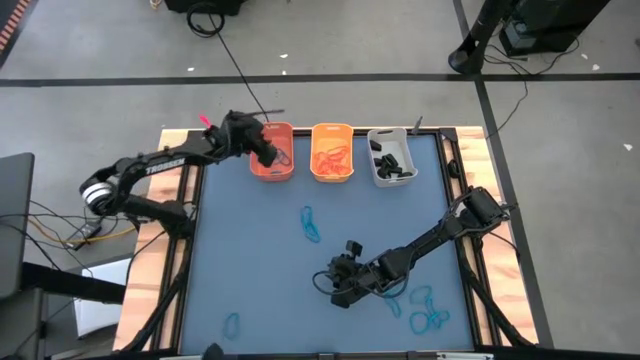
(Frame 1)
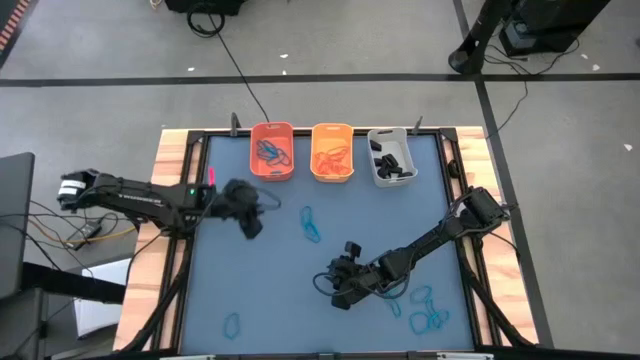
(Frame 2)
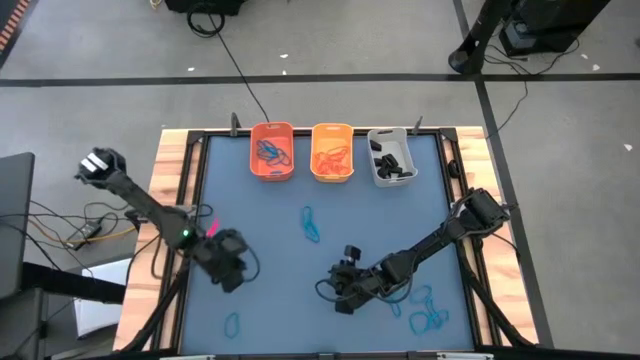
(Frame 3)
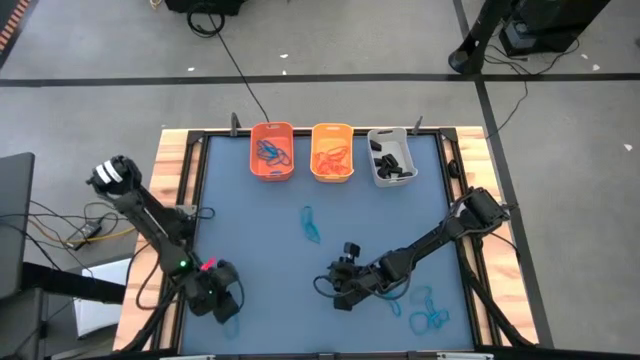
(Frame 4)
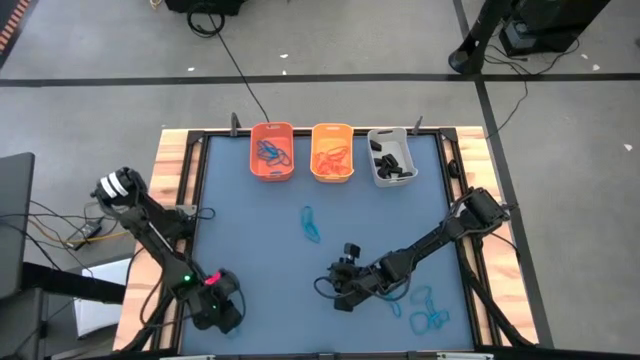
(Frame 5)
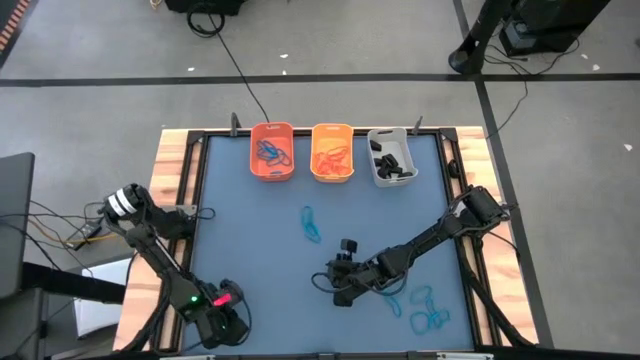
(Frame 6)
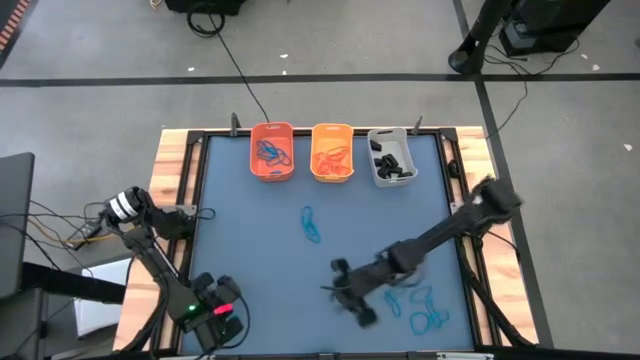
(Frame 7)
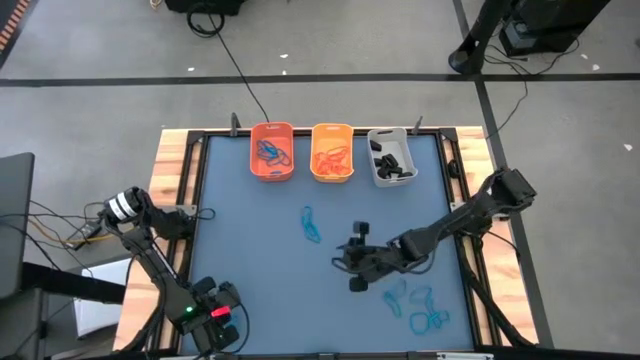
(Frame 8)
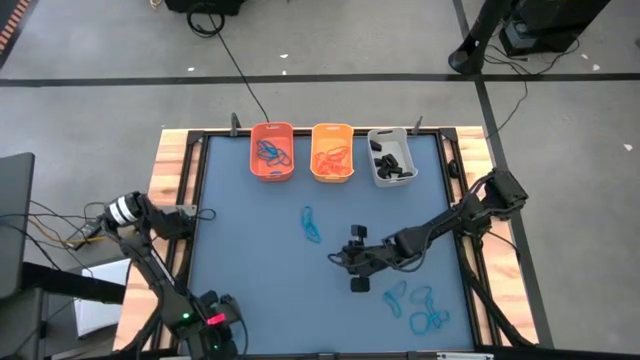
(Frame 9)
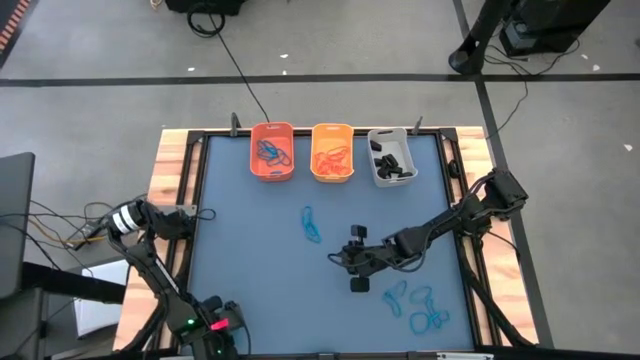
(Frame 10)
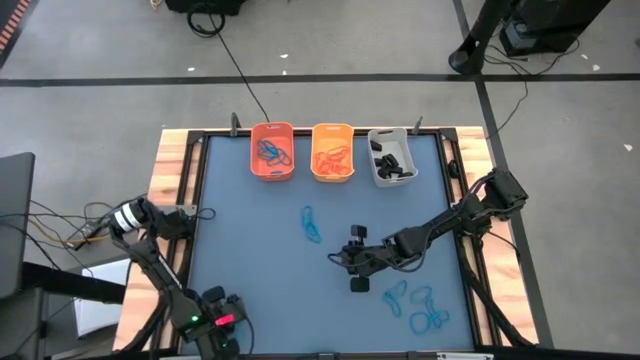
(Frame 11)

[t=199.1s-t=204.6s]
Task: Sort rubber bands into baskets
Put the blue rubber band into the orange bin

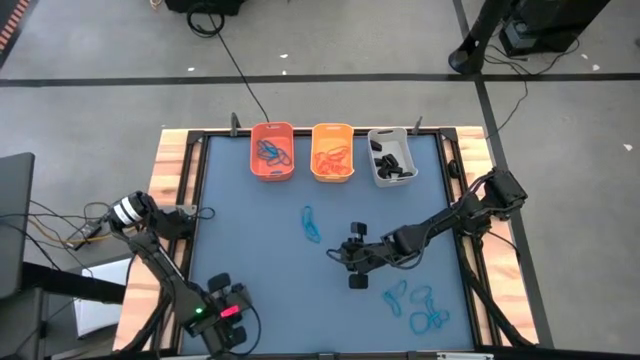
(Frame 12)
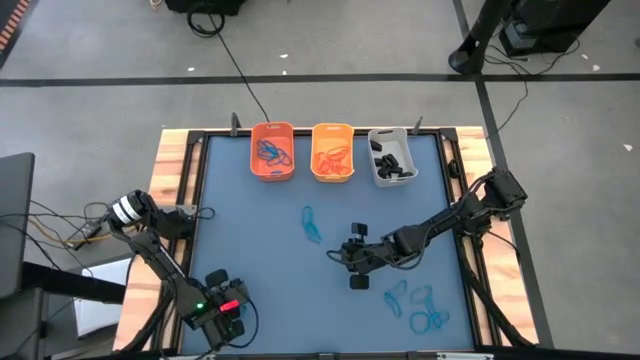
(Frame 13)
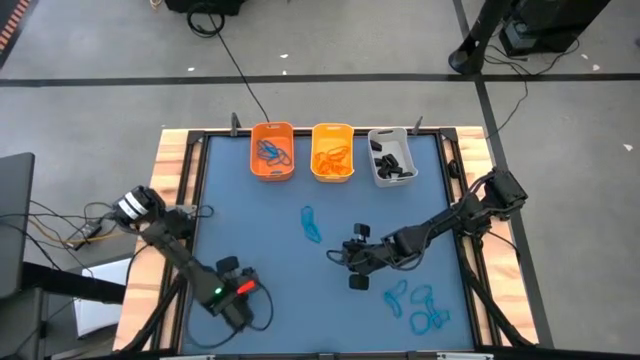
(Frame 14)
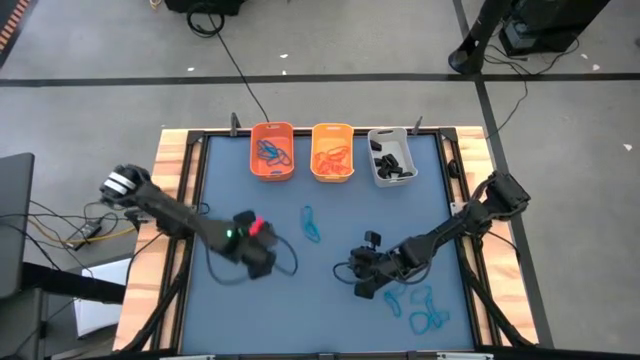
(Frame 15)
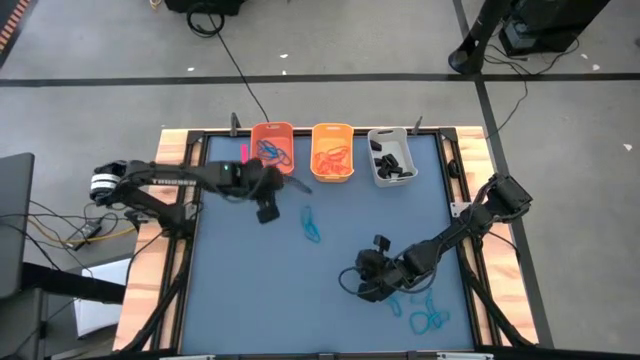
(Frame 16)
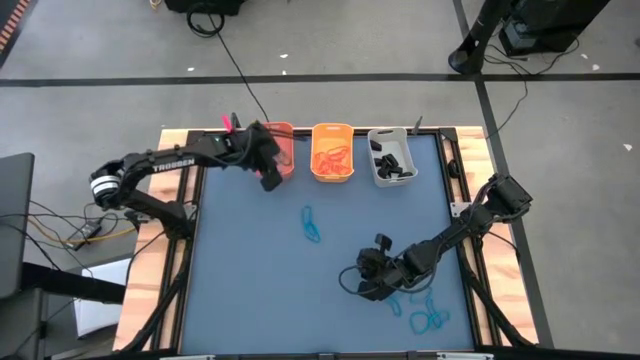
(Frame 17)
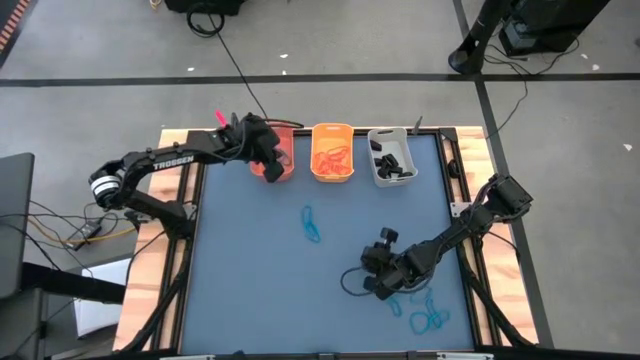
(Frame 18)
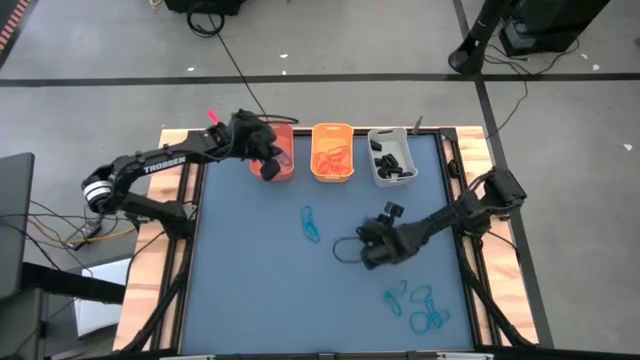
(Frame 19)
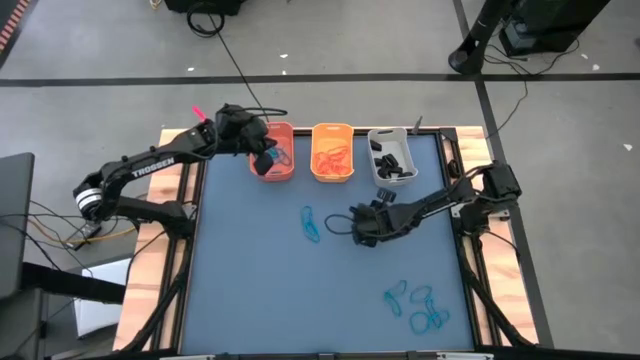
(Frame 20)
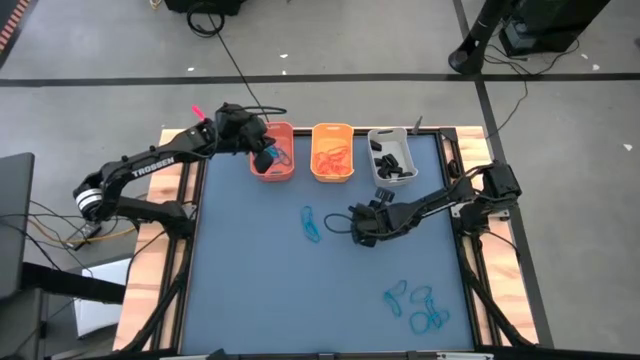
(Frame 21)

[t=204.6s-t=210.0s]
Put the blue rubber band into the orange bin

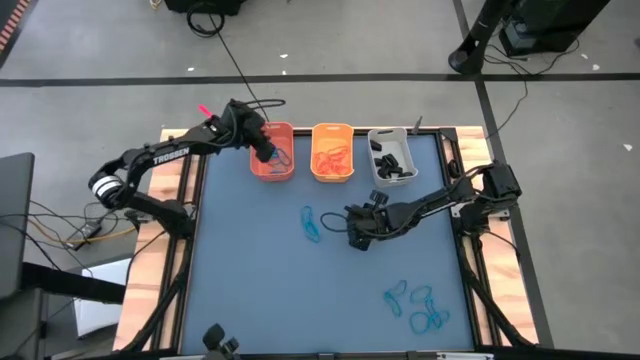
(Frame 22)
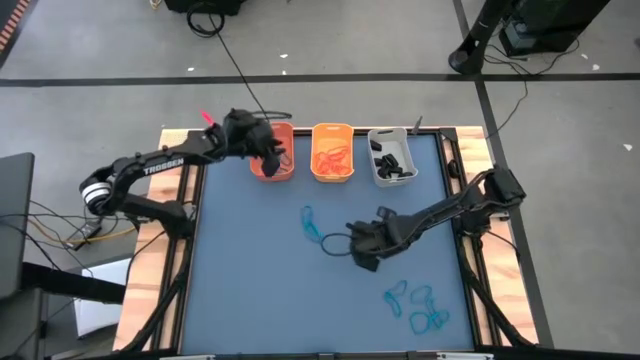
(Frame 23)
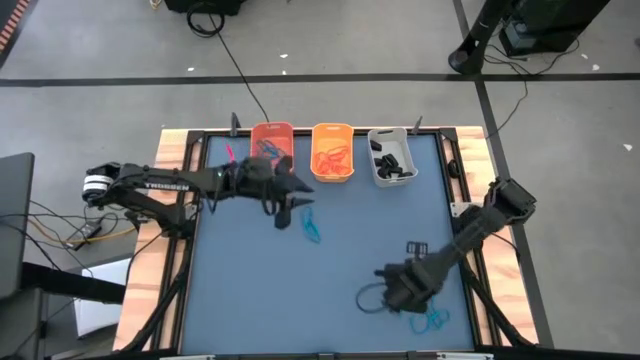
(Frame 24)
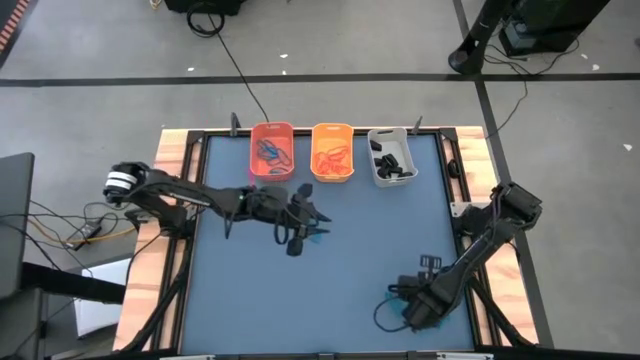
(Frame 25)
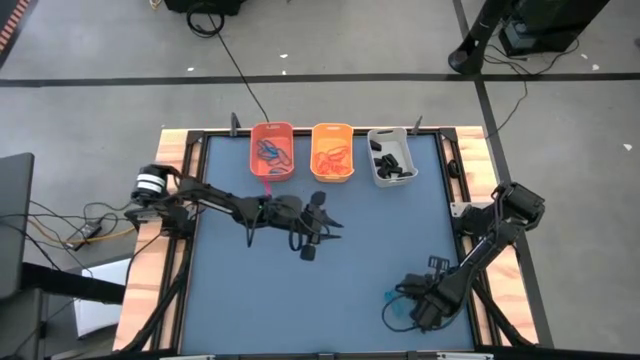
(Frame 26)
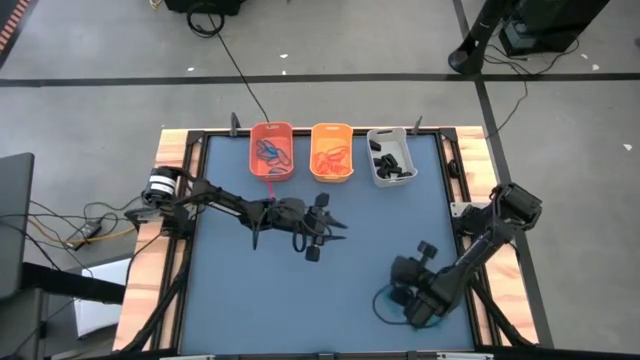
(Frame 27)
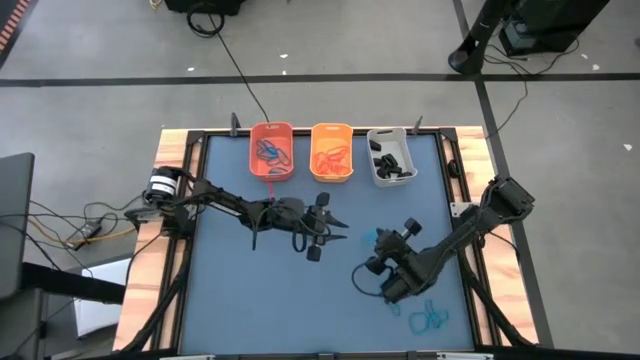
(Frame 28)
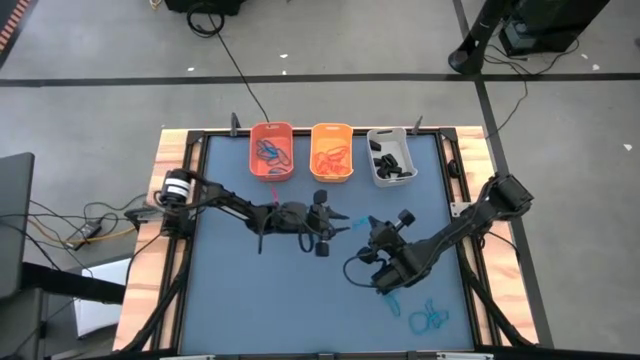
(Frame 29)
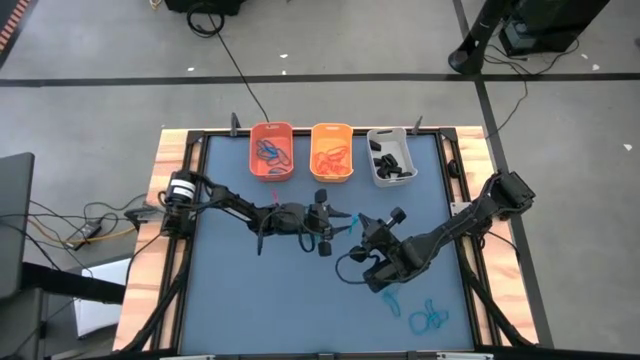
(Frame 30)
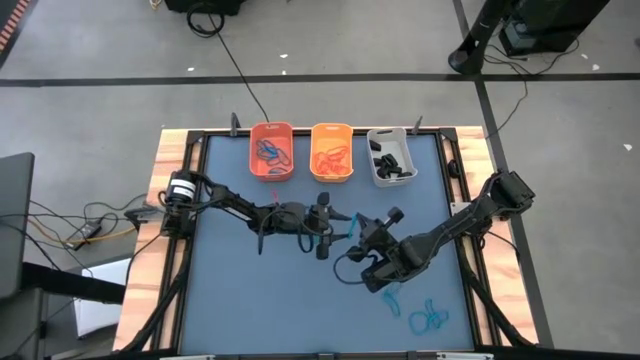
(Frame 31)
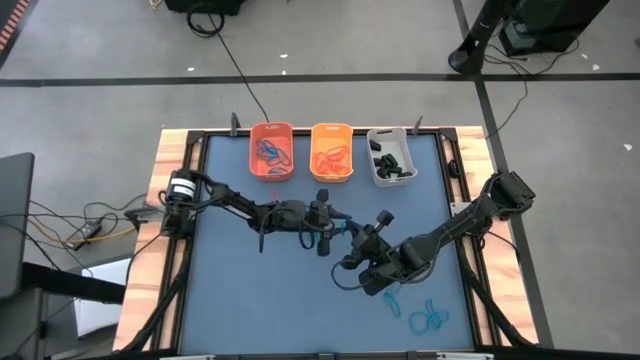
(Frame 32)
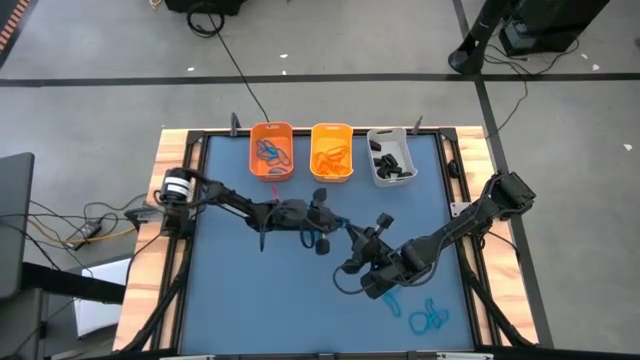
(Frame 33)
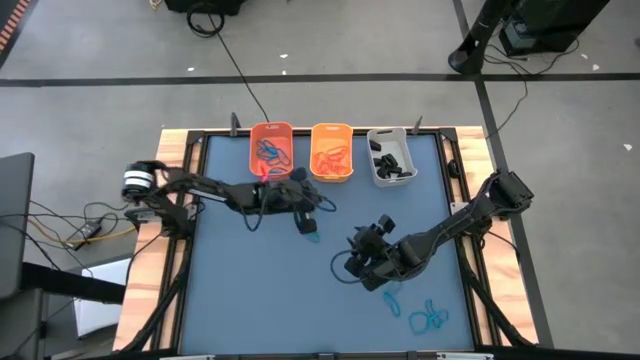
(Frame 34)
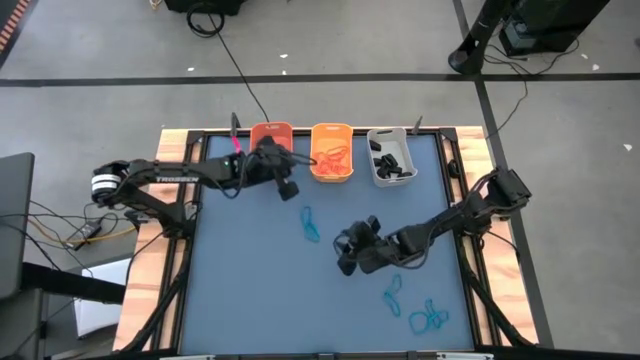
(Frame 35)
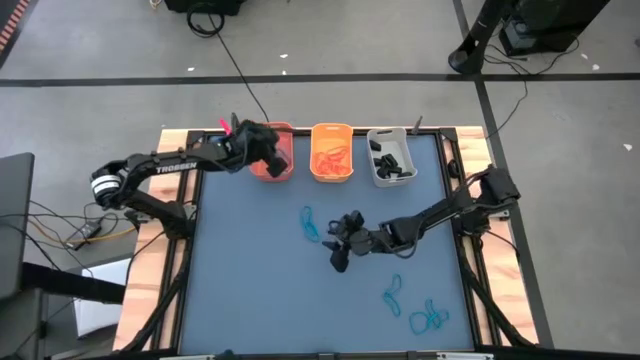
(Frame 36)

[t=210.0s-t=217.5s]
Put the blue rubber band into the orange bin

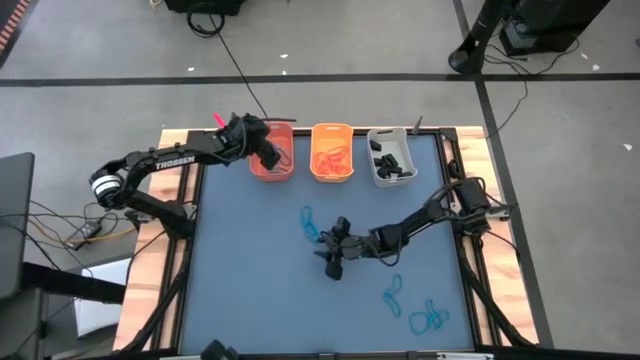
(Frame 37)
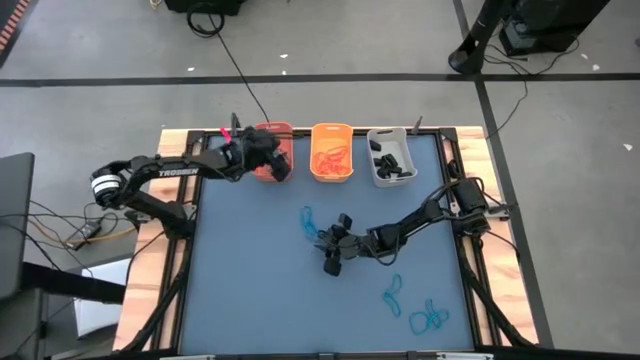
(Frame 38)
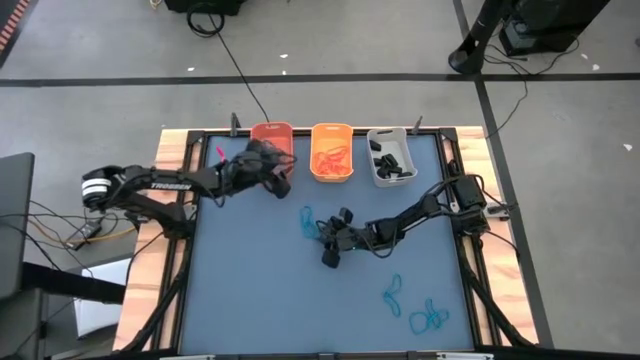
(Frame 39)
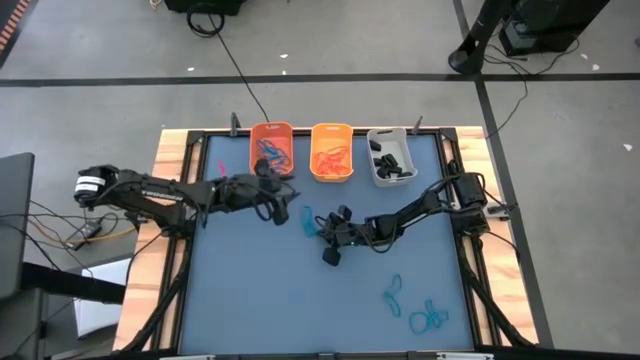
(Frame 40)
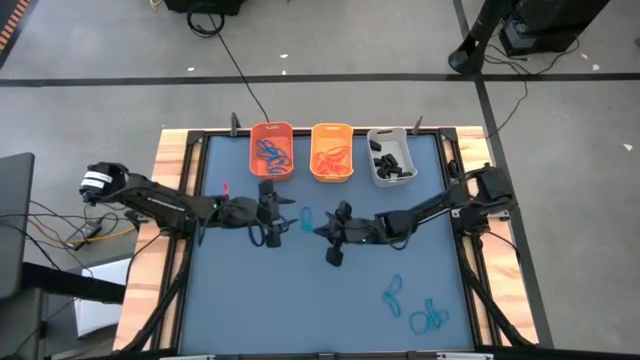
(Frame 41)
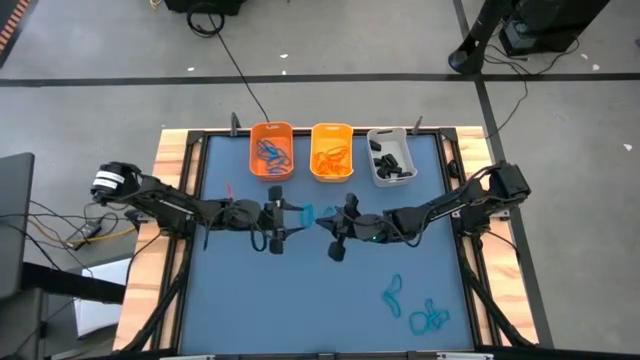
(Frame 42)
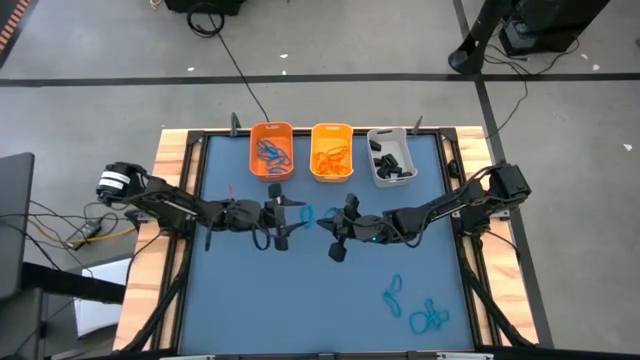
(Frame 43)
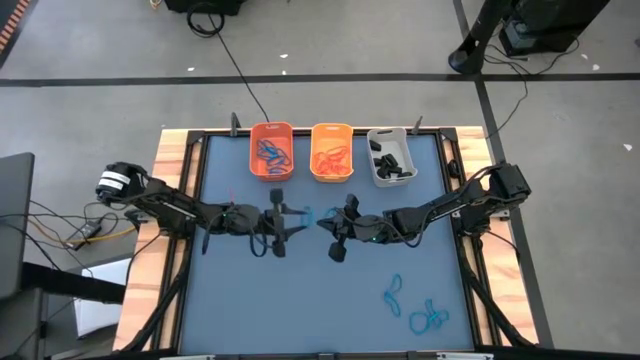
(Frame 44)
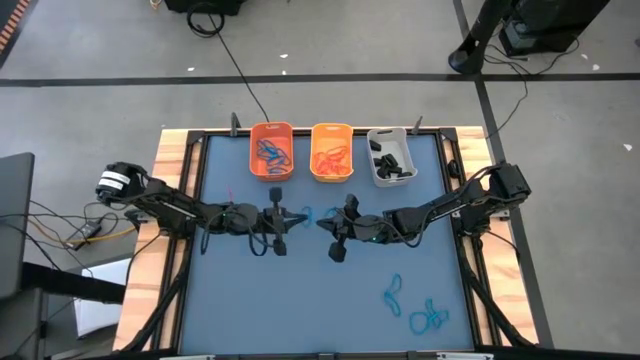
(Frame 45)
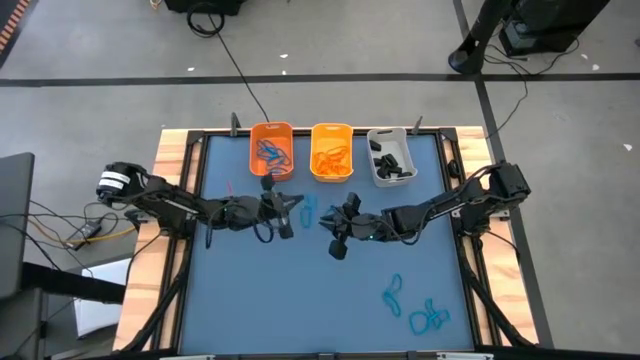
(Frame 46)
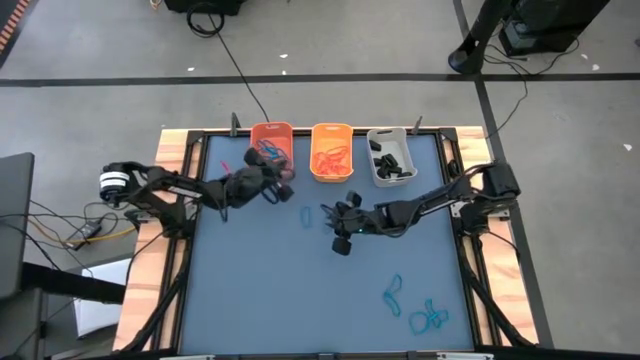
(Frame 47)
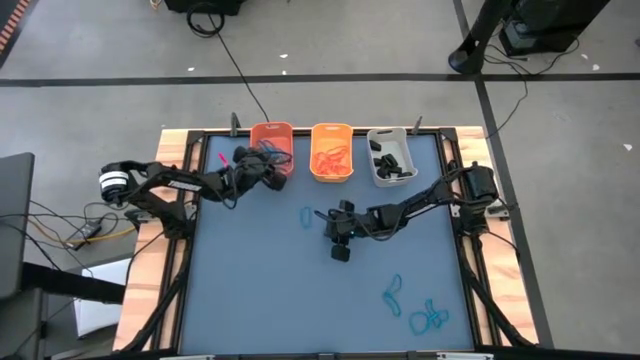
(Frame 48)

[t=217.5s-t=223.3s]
Put the blue rubber band into the orange bin
